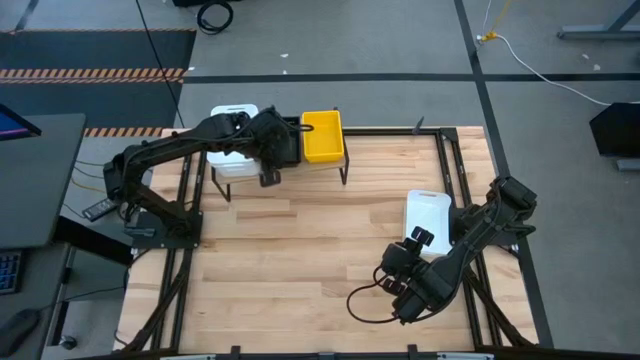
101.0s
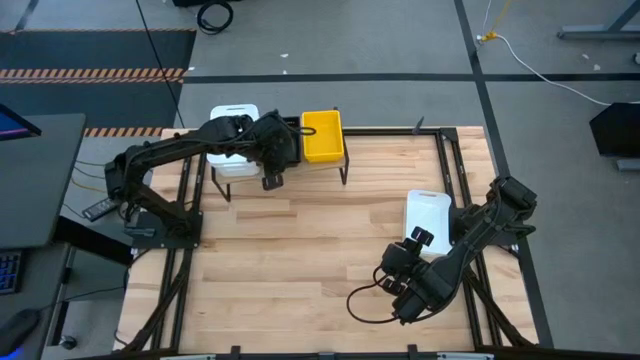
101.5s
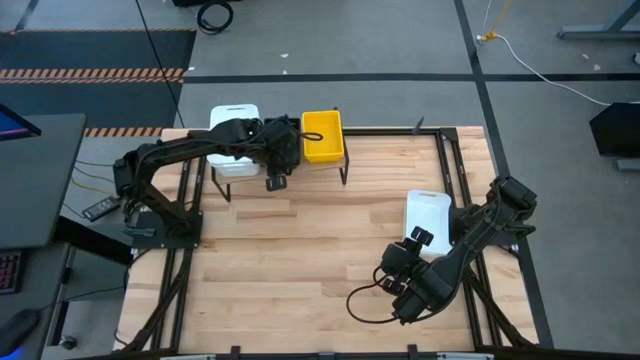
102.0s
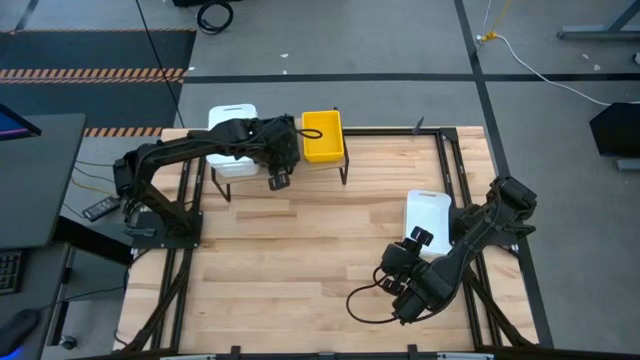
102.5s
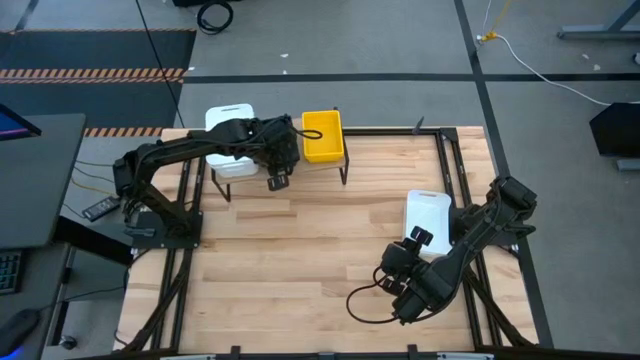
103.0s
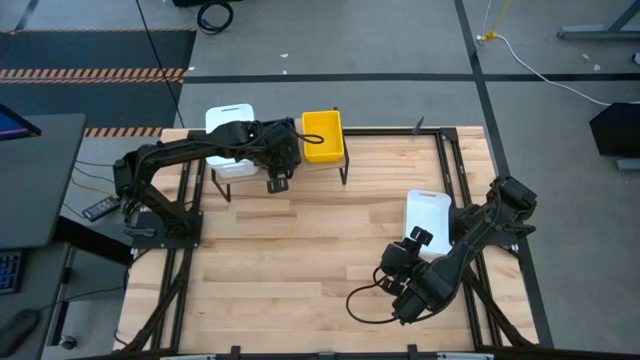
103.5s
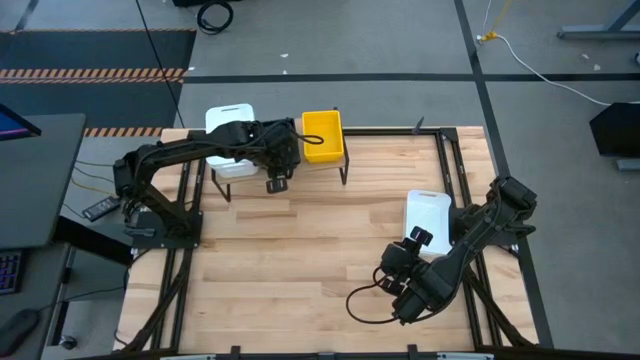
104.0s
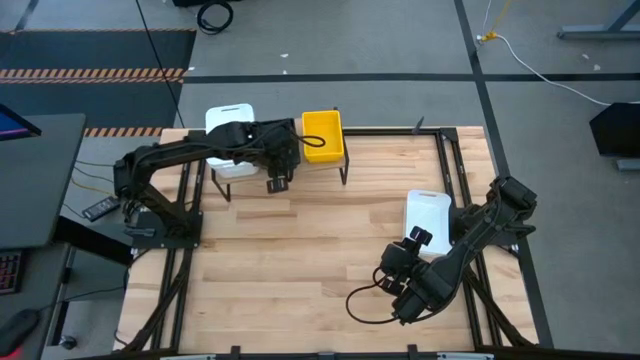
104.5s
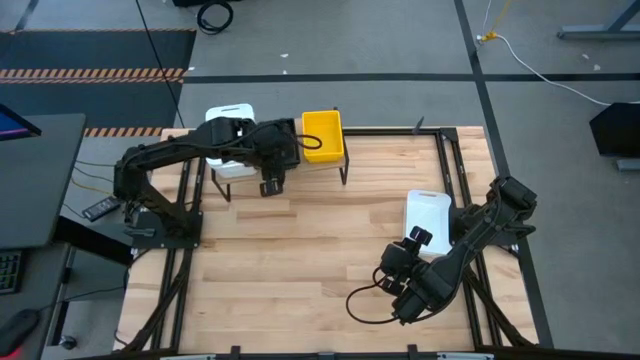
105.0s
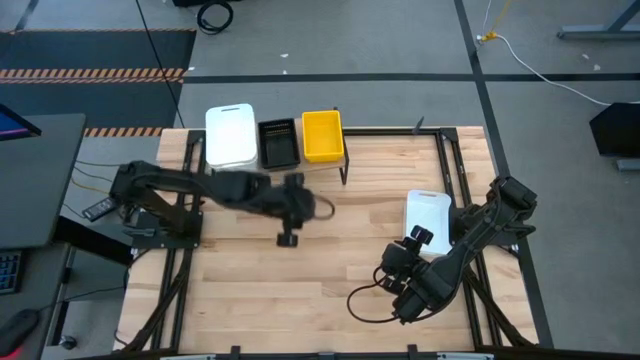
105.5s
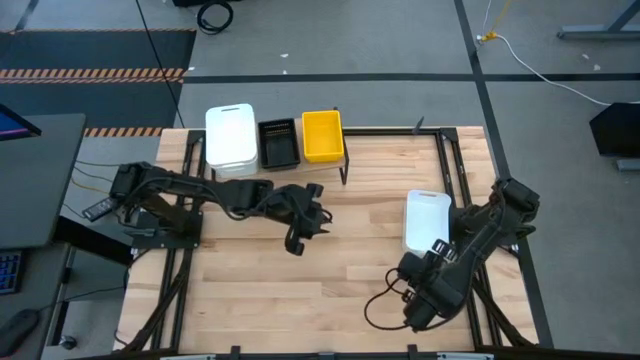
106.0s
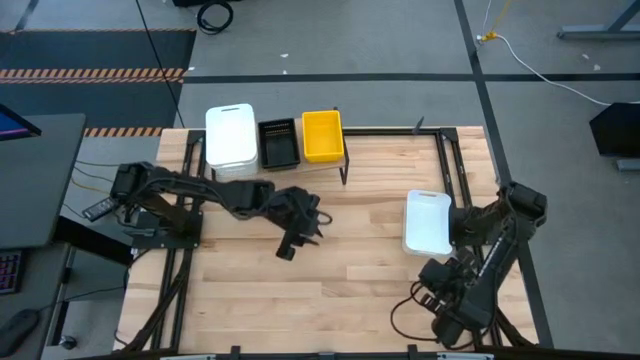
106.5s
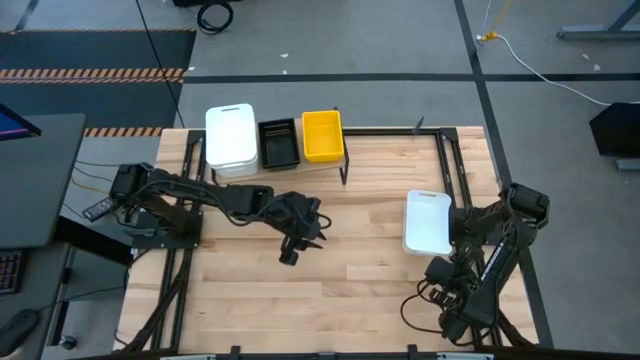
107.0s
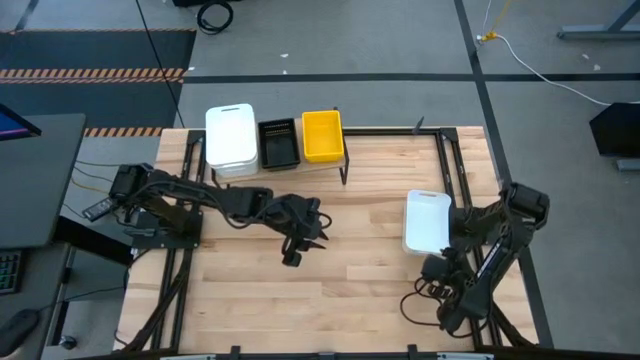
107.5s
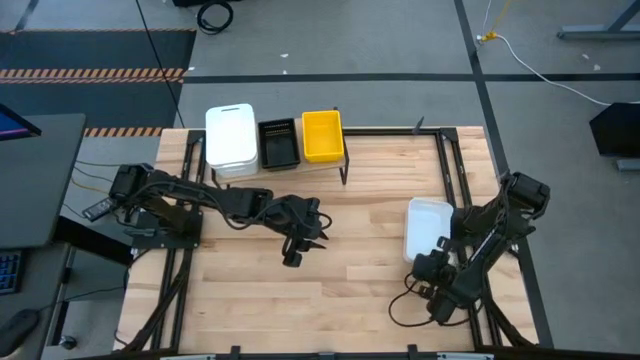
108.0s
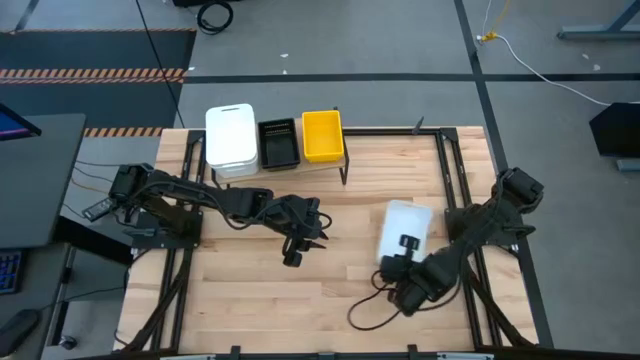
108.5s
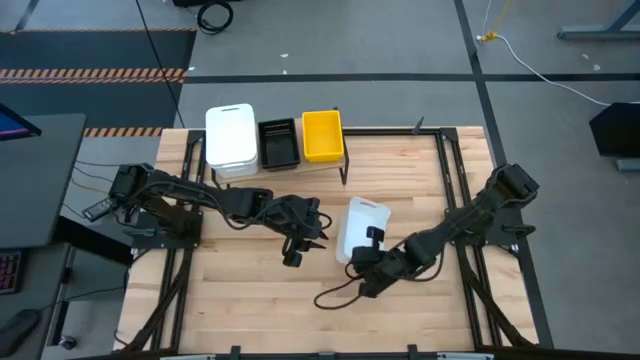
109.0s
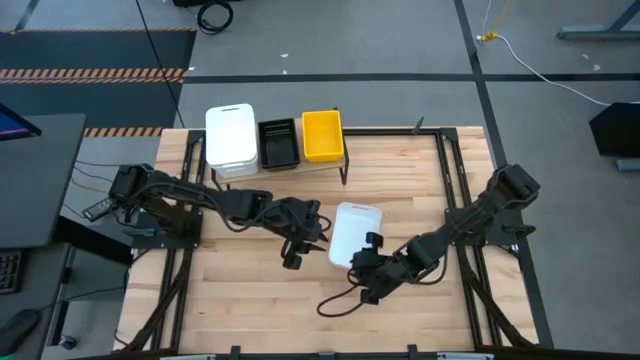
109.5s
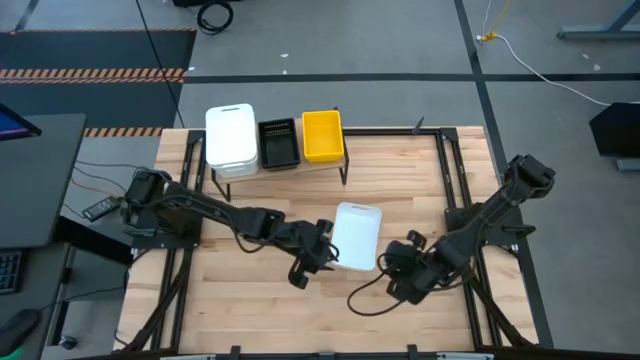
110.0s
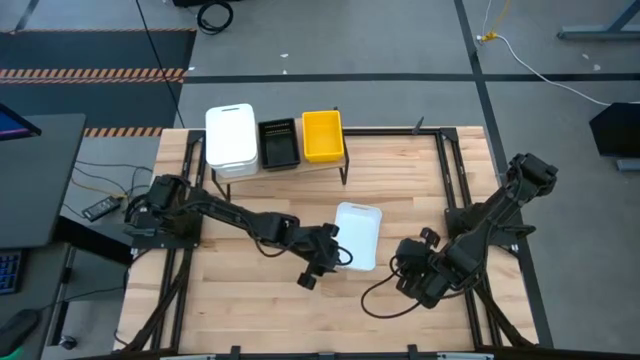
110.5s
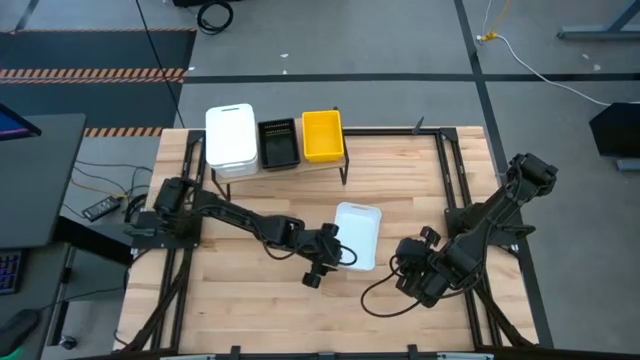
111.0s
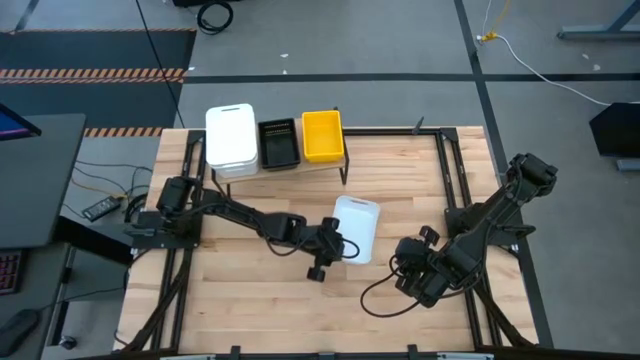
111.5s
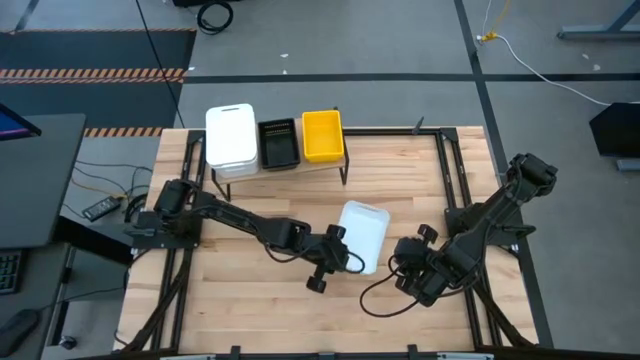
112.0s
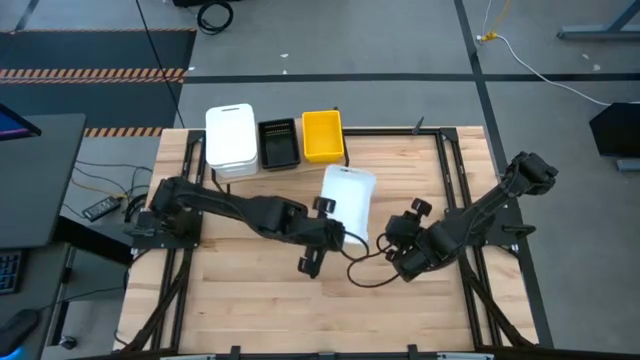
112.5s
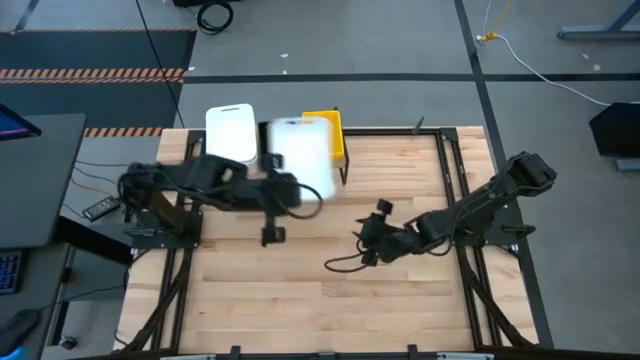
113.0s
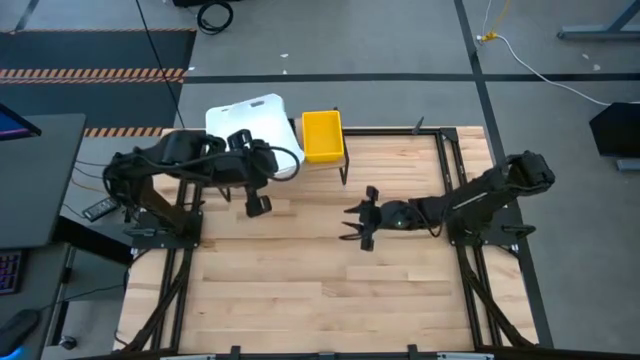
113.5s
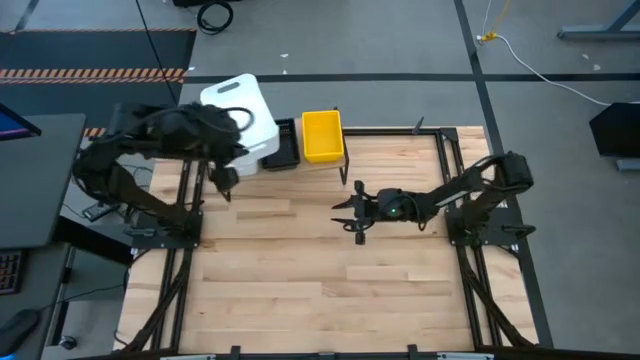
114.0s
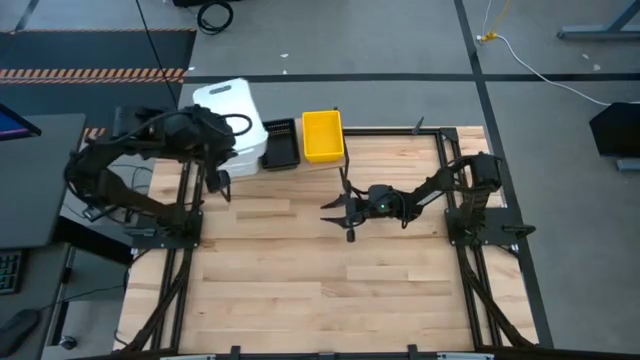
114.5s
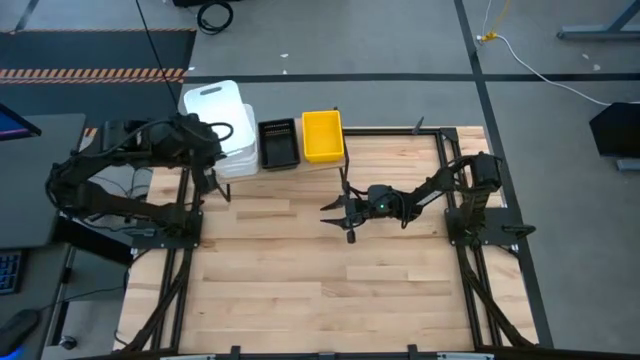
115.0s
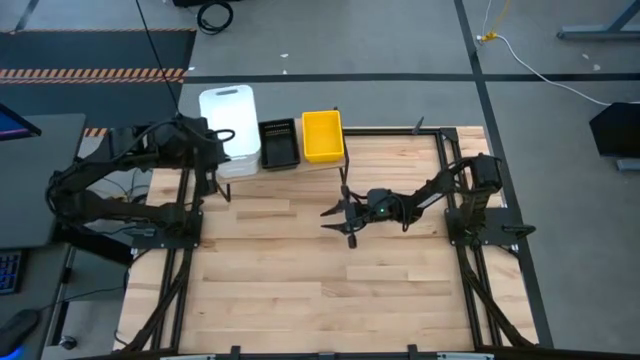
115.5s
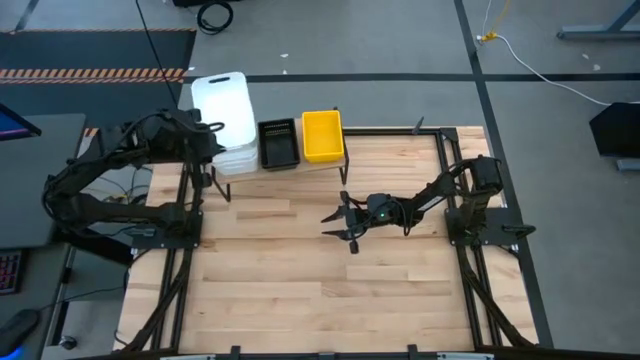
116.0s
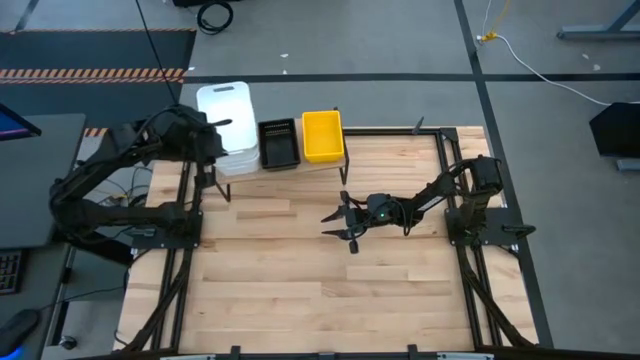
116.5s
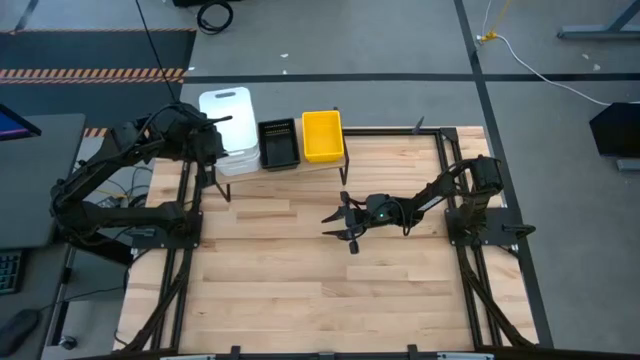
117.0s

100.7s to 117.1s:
Task: Stack baskets on shelf by color
Stack the white bin on top of the other white bin on the shelf
